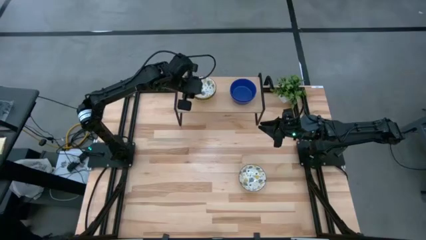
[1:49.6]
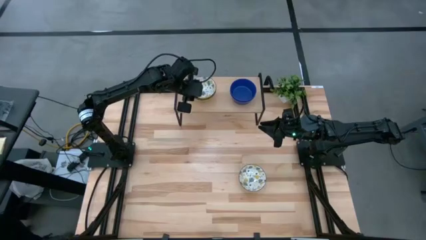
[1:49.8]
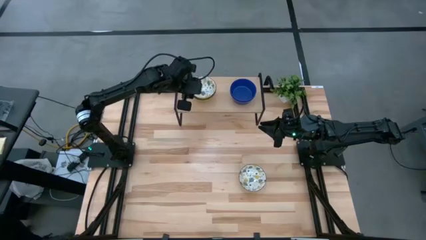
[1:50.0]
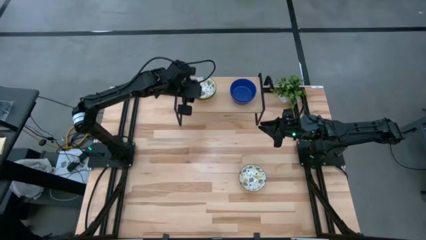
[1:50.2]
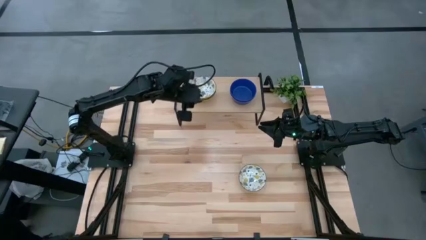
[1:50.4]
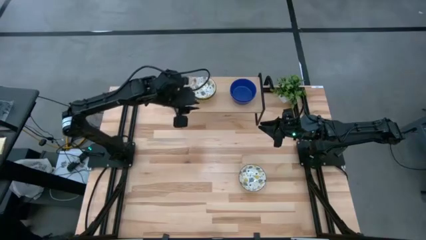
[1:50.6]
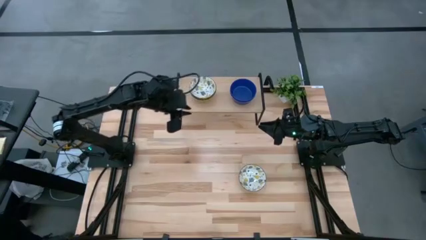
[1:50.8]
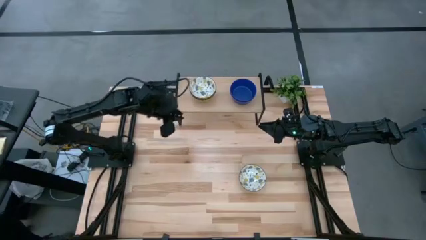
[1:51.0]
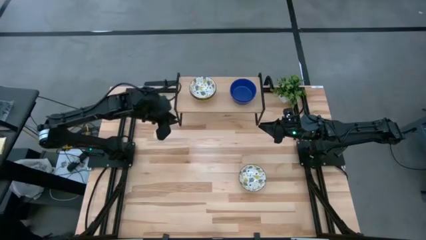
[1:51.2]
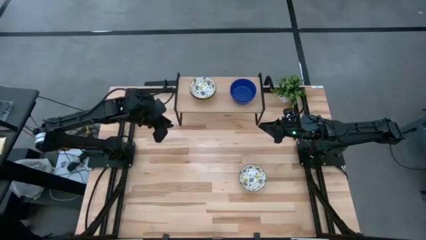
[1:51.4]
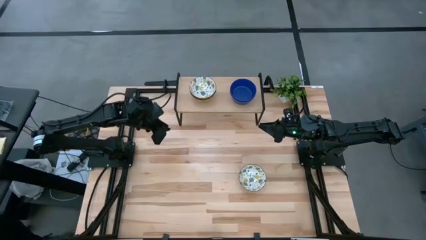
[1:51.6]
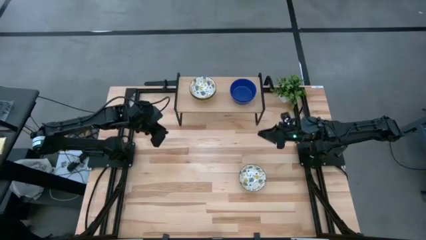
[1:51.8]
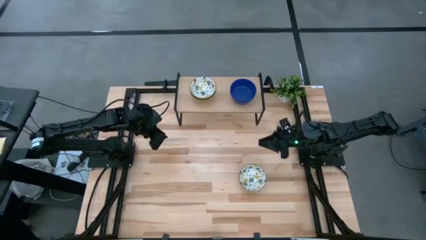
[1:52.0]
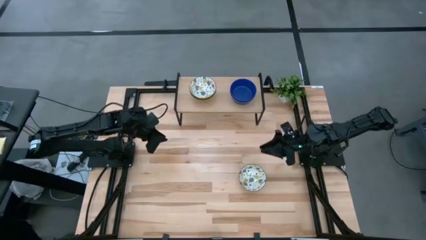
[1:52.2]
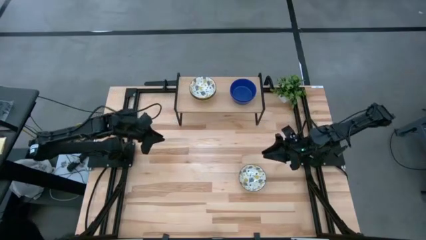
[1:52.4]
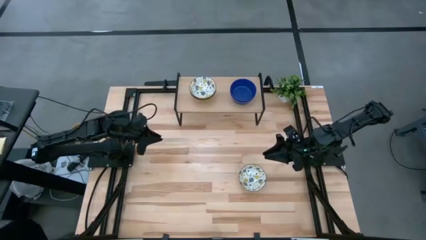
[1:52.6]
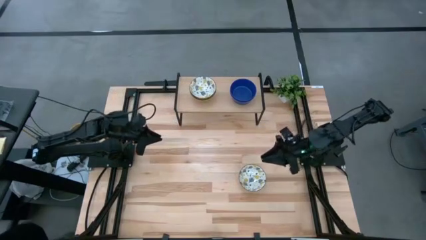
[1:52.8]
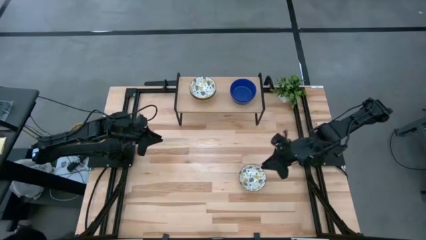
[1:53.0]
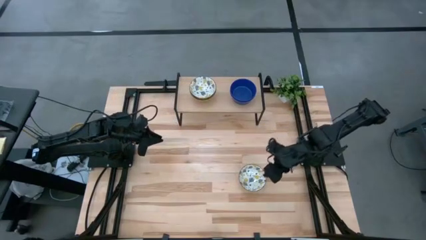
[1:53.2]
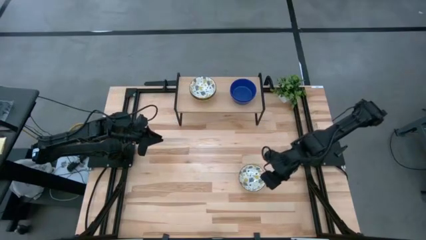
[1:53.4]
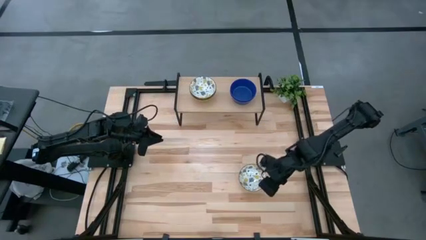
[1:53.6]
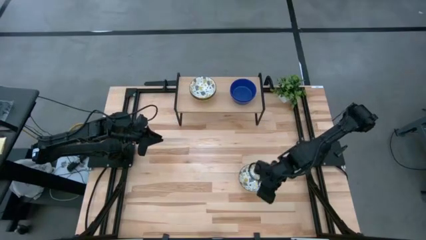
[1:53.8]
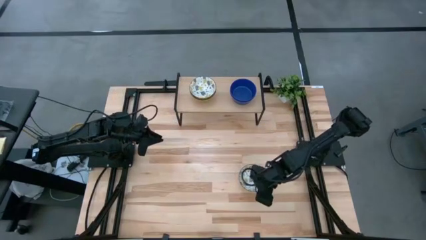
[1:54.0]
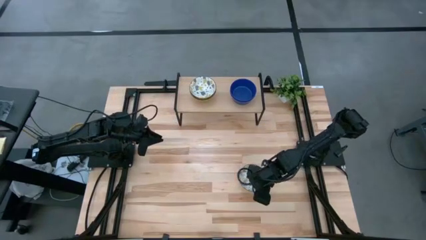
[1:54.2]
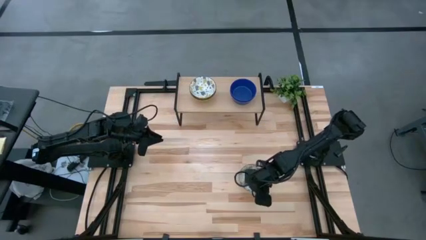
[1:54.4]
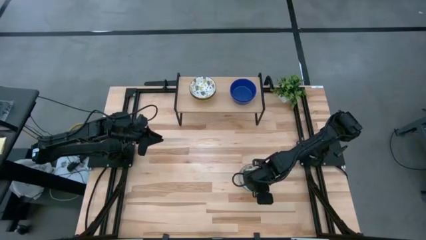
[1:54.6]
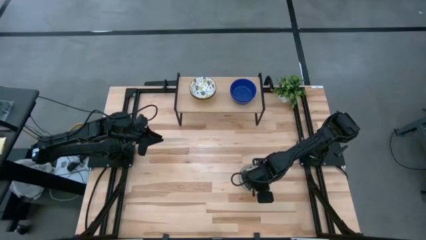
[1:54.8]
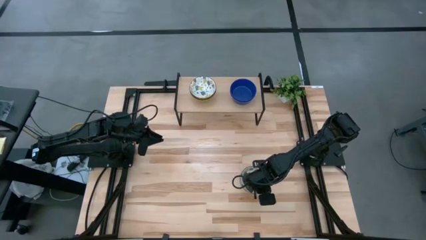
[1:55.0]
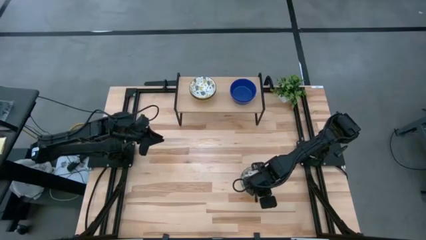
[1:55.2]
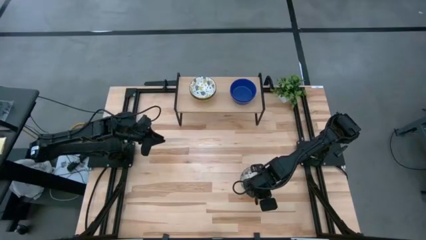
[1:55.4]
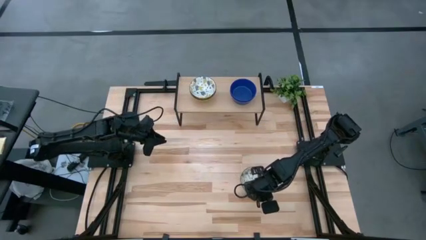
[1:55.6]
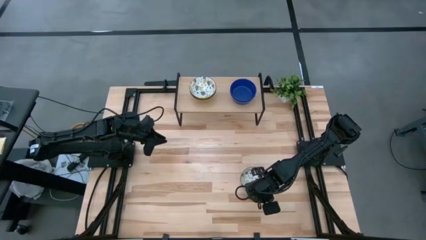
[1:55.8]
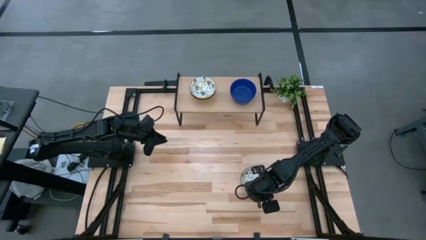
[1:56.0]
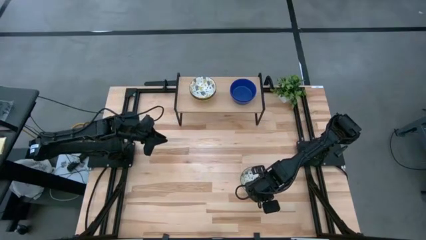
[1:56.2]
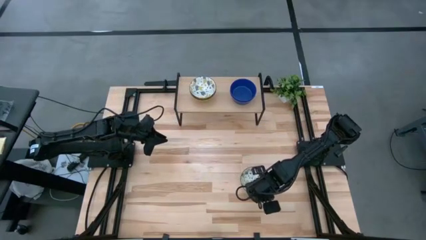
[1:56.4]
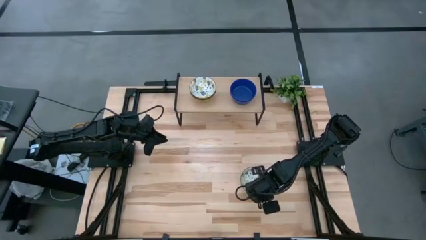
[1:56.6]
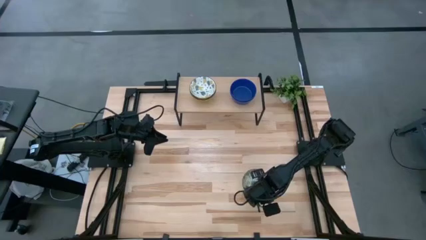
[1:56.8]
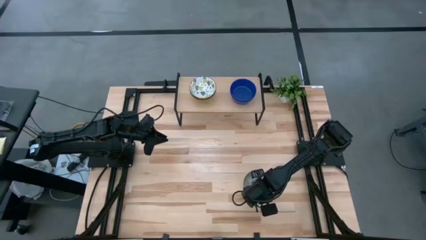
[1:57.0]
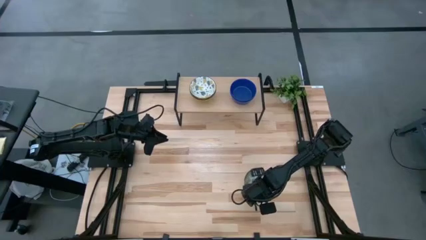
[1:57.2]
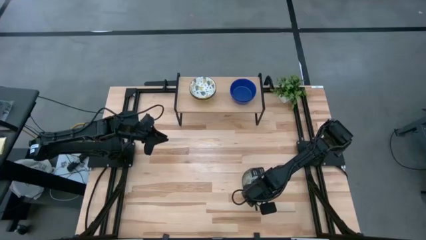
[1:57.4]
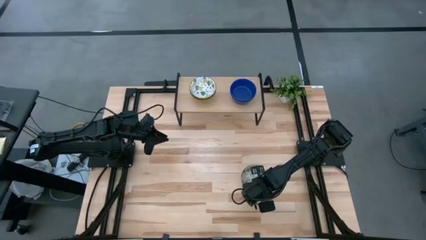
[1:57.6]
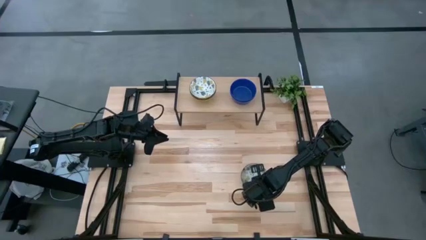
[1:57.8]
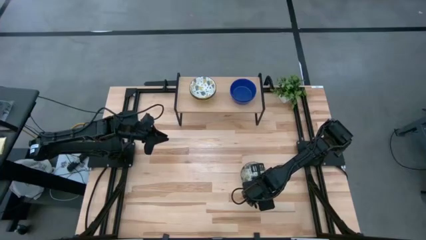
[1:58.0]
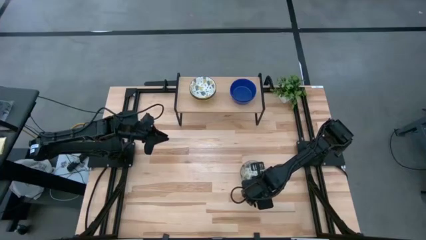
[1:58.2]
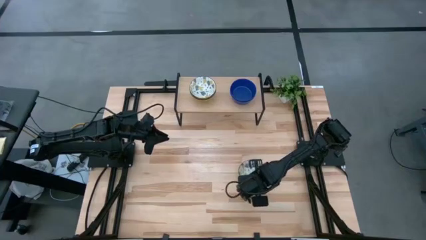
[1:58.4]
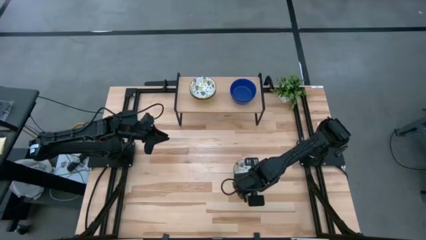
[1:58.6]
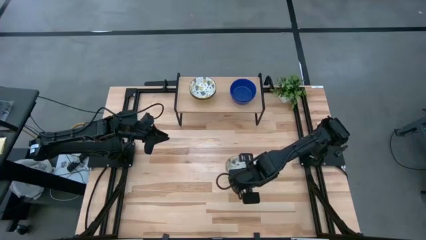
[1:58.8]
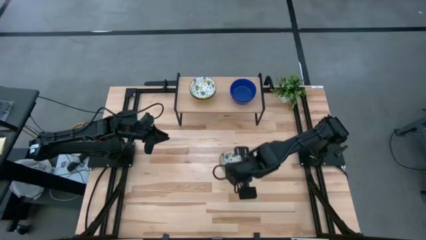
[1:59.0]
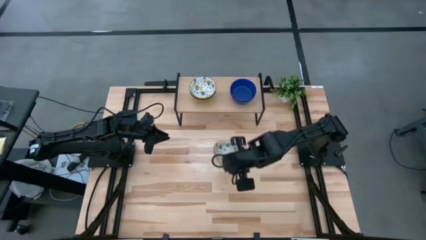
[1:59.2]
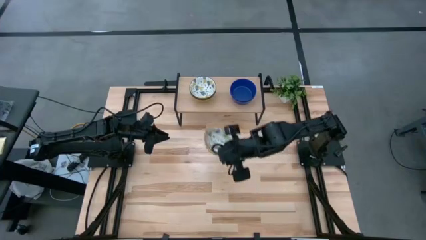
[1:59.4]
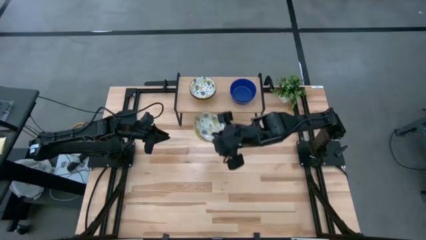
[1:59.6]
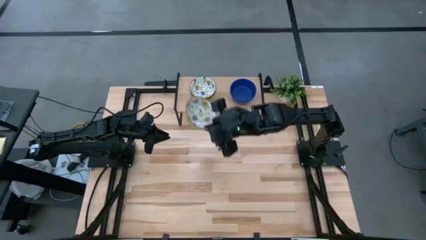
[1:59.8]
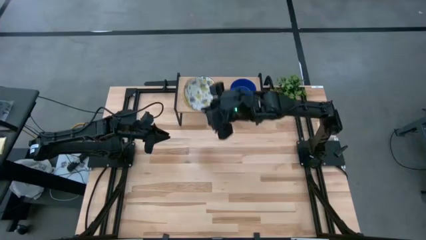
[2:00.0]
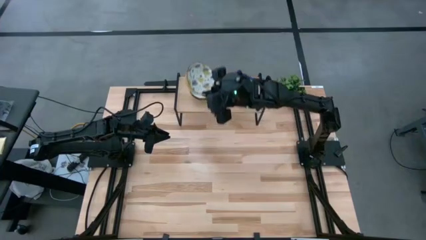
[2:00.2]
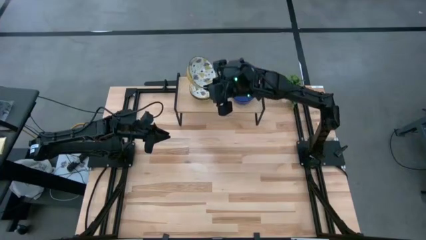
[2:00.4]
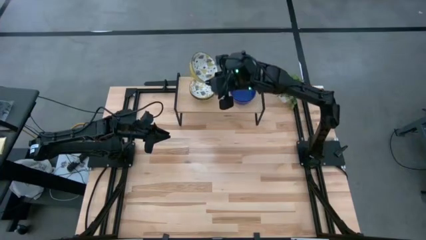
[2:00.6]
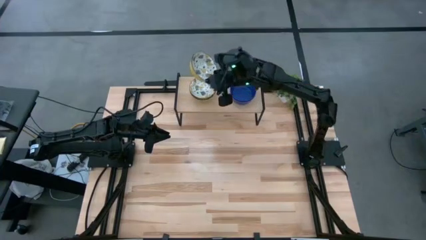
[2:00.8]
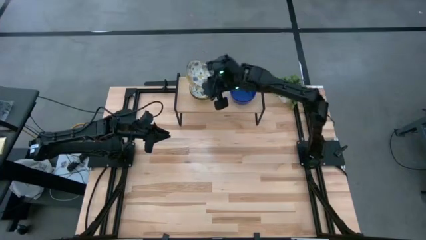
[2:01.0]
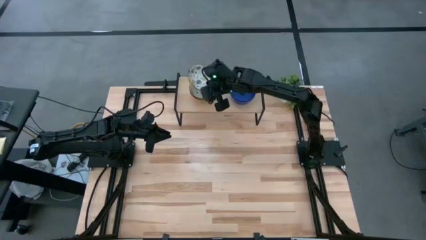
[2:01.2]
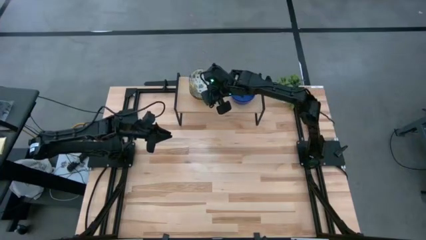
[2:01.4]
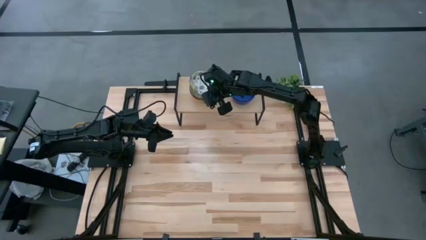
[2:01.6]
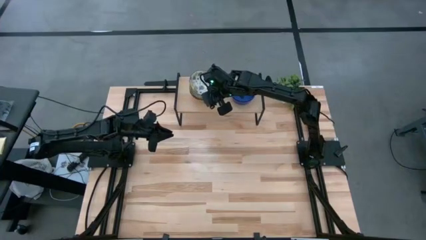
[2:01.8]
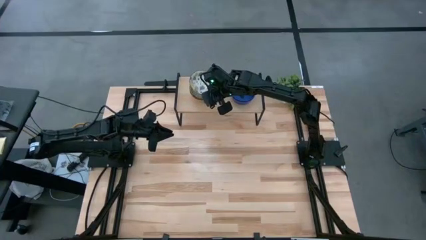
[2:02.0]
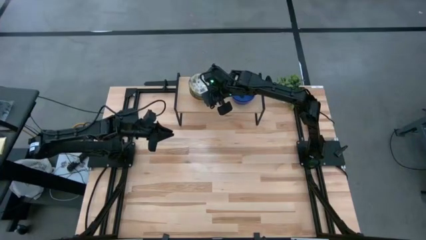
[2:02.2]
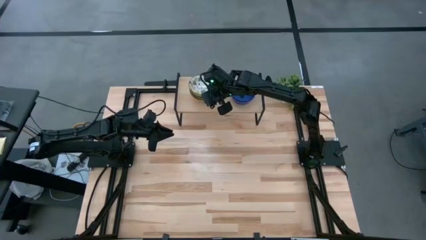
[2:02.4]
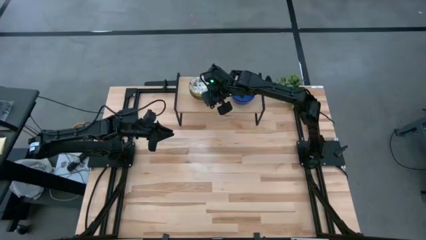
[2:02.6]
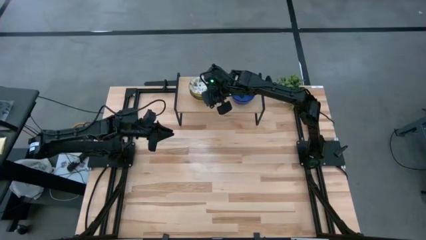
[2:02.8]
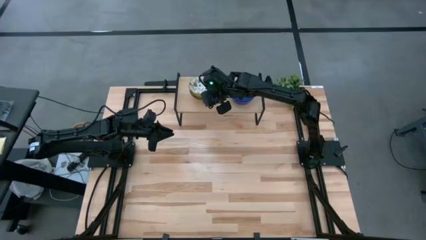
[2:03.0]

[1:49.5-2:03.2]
Task: Pick & Place Mini bowls
Stack the white patterned bowl on top of the white patterned bowl on the shelf

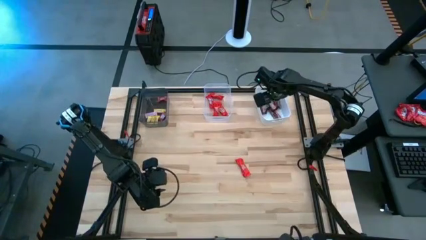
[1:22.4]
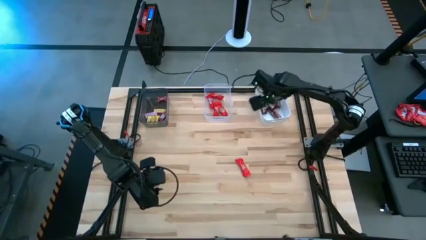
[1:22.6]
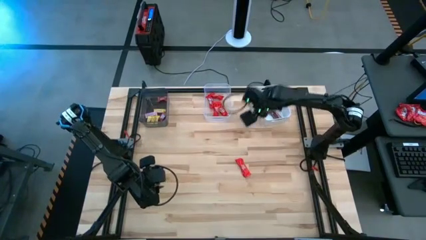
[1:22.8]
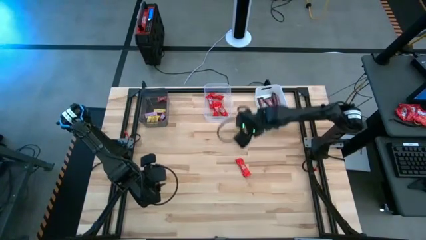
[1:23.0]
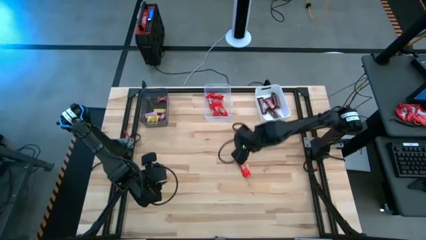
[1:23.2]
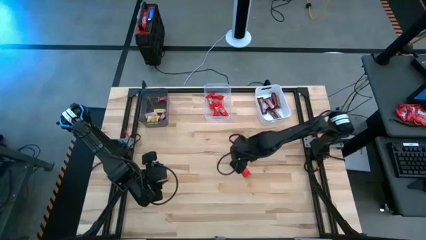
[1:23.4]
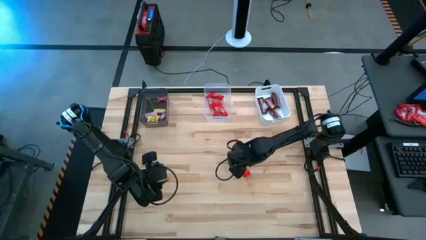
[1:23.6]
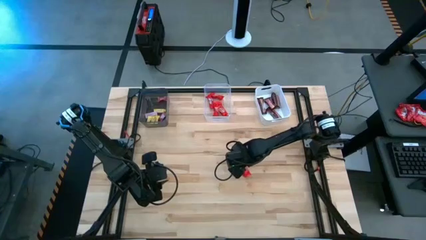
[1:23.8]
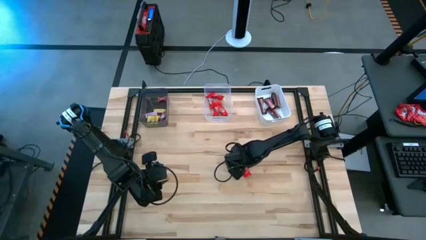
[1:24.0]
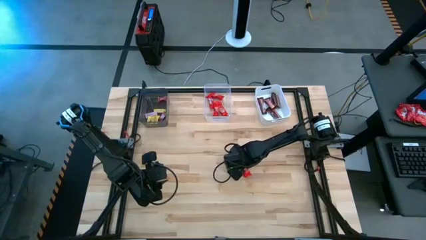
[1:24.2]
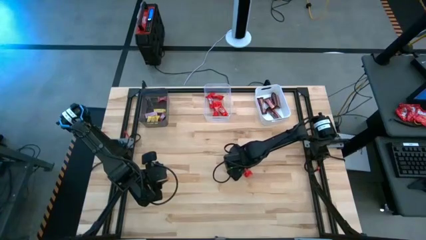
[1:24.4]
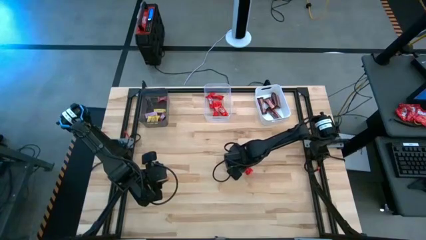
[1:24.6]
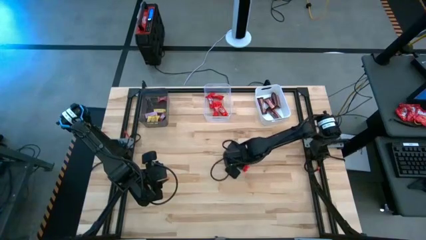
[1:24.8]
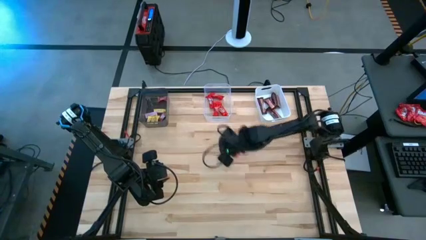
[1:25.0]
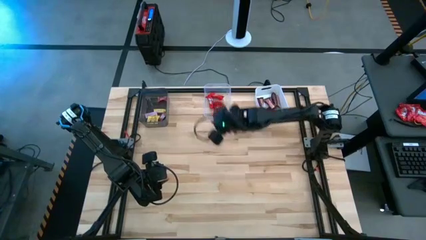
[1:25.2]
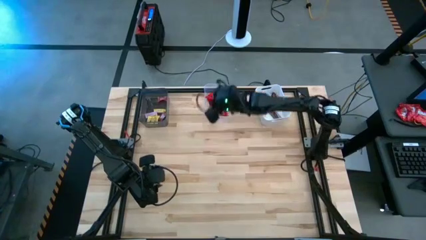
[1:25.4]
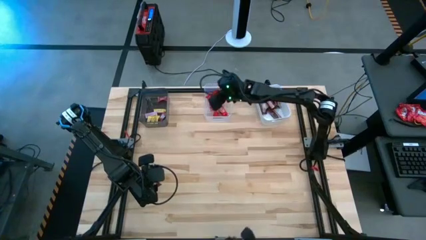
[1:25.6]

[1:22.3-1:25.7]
Task: Sort candy by brand, put in halloween buckets
Put the red chocolate bar into the transparent bin
